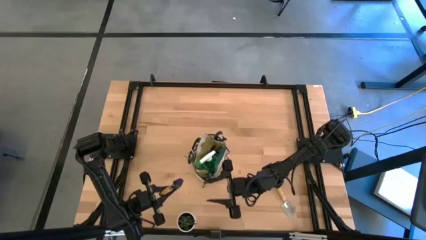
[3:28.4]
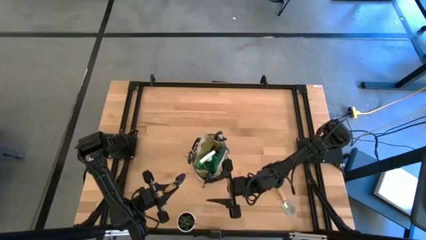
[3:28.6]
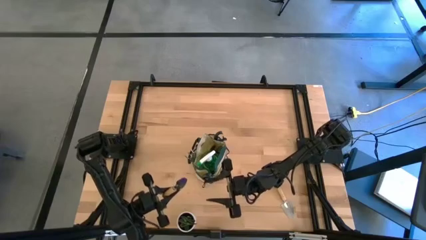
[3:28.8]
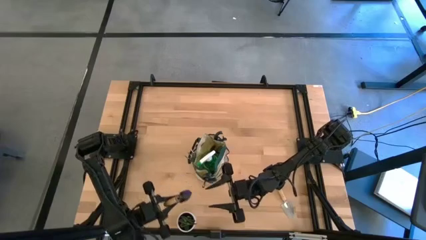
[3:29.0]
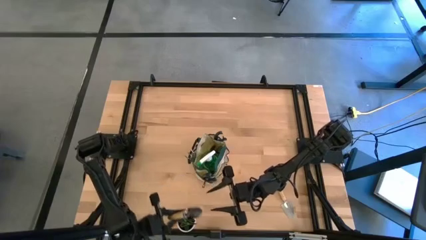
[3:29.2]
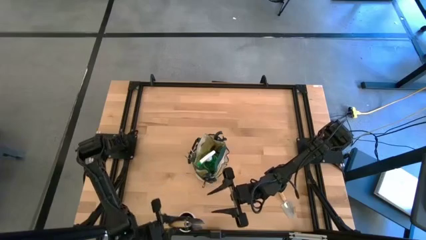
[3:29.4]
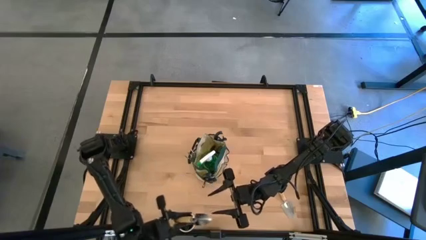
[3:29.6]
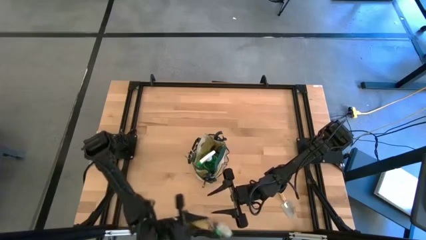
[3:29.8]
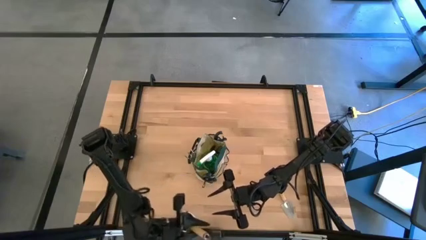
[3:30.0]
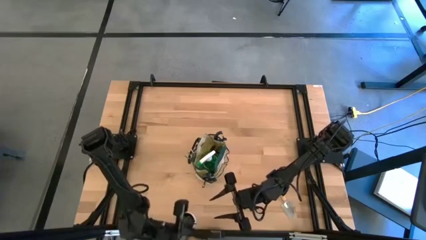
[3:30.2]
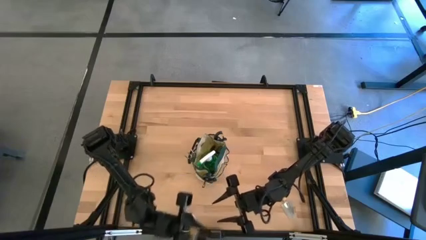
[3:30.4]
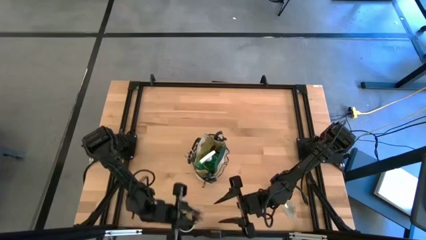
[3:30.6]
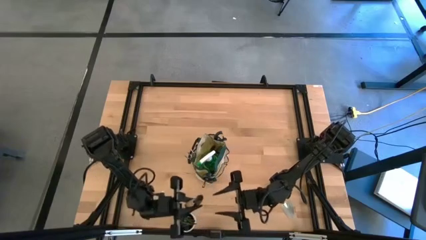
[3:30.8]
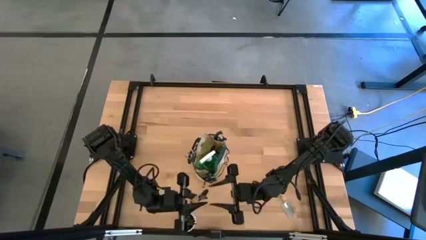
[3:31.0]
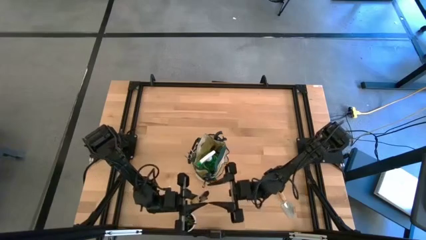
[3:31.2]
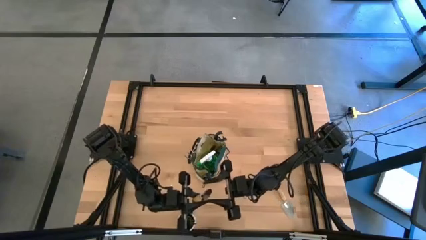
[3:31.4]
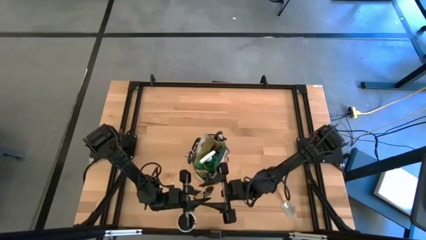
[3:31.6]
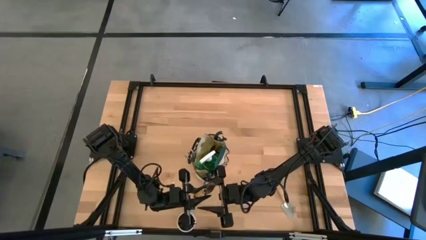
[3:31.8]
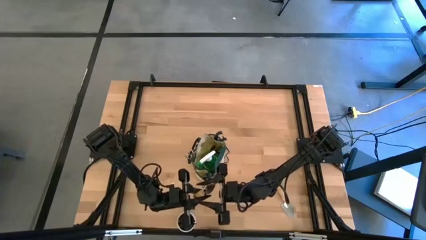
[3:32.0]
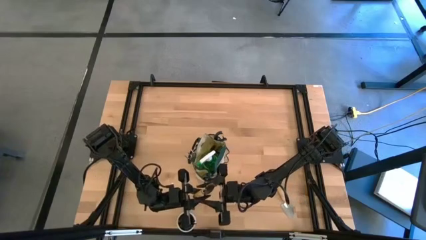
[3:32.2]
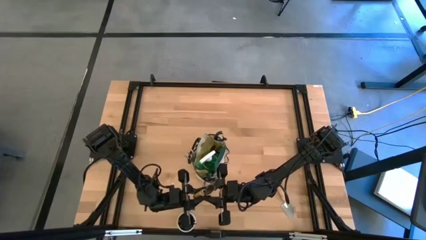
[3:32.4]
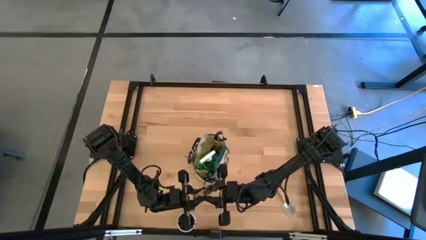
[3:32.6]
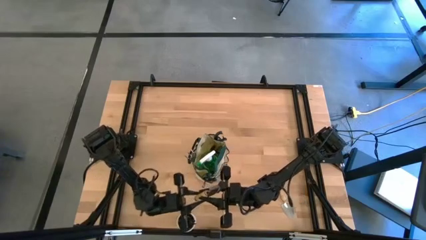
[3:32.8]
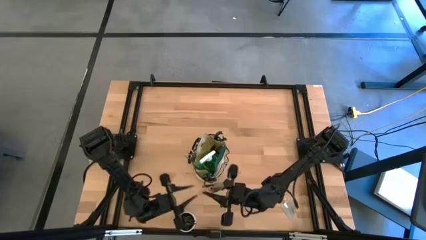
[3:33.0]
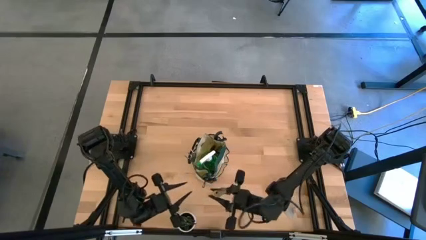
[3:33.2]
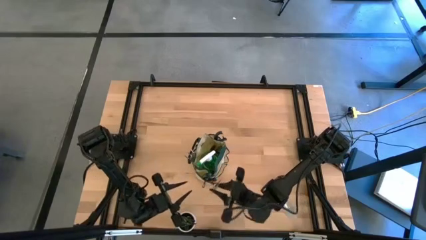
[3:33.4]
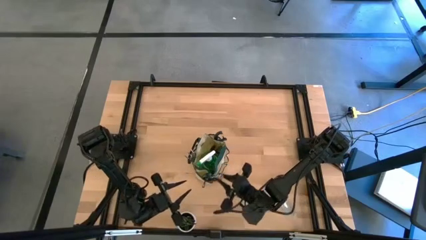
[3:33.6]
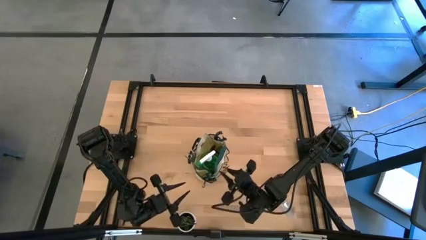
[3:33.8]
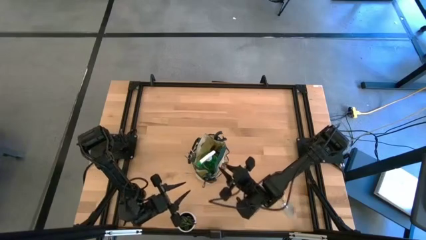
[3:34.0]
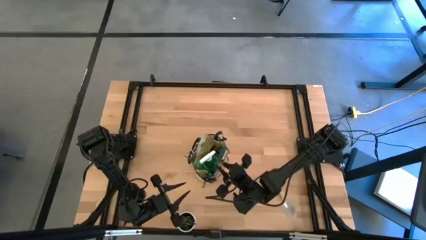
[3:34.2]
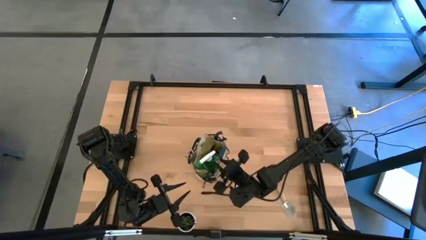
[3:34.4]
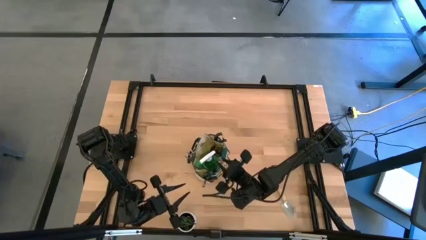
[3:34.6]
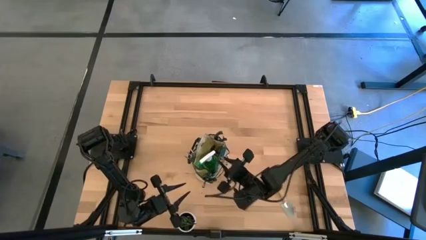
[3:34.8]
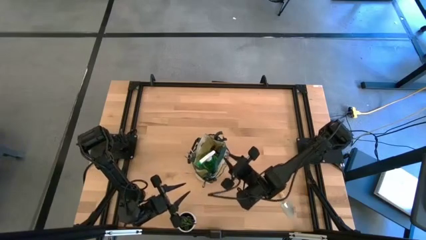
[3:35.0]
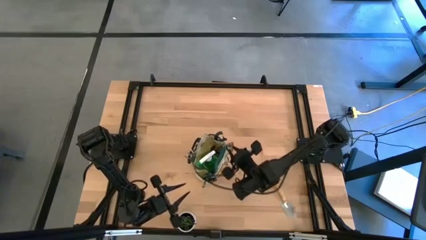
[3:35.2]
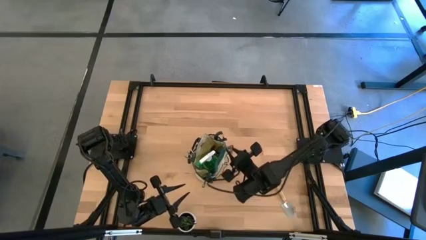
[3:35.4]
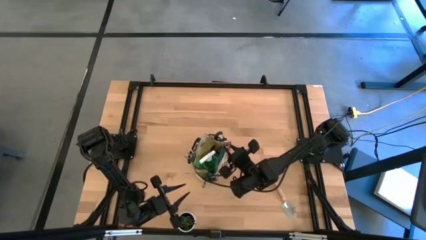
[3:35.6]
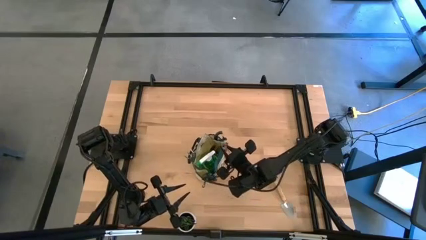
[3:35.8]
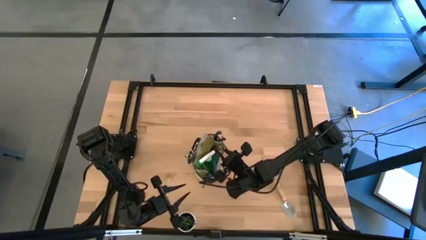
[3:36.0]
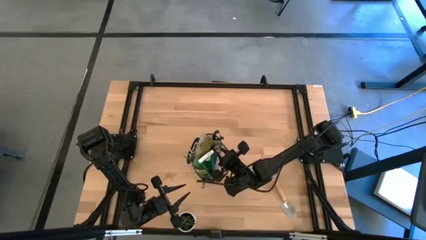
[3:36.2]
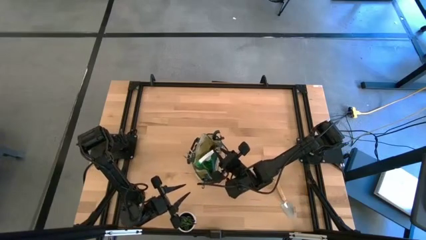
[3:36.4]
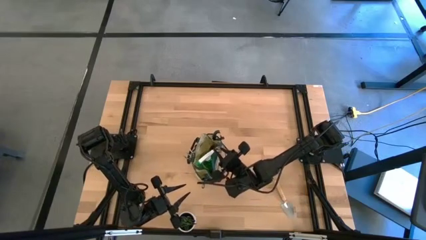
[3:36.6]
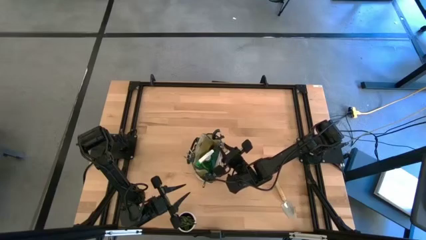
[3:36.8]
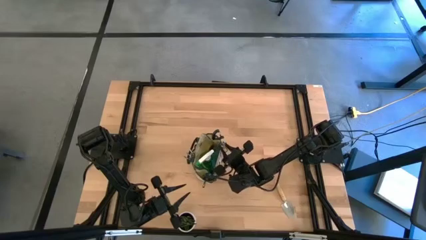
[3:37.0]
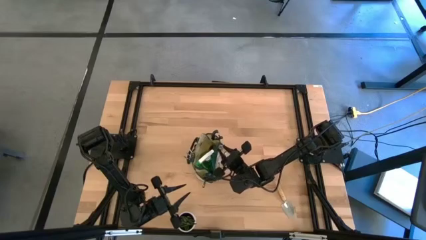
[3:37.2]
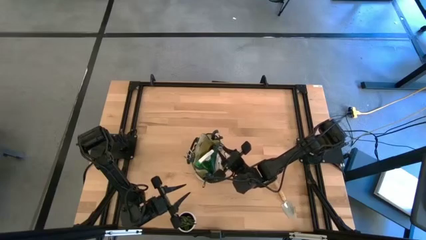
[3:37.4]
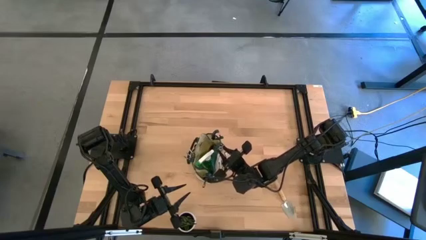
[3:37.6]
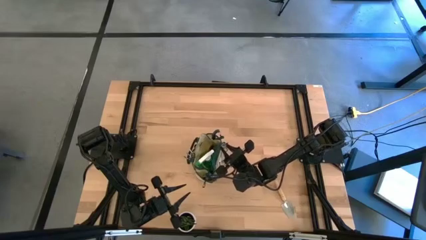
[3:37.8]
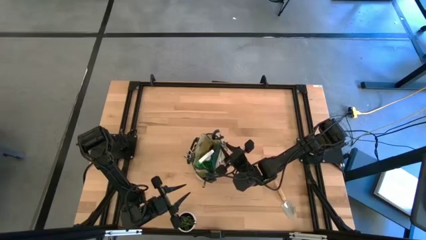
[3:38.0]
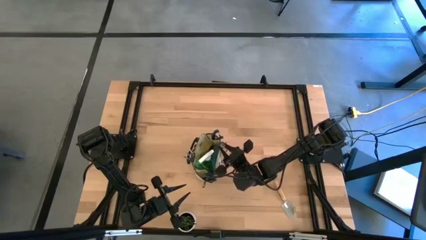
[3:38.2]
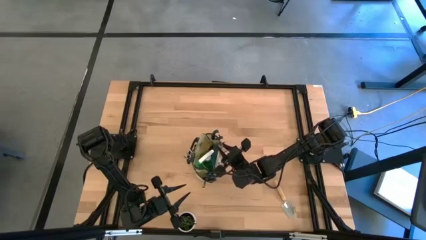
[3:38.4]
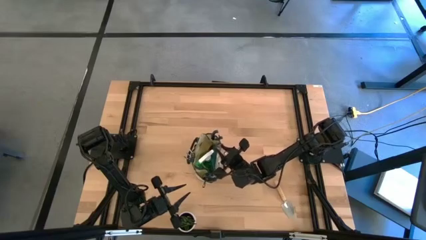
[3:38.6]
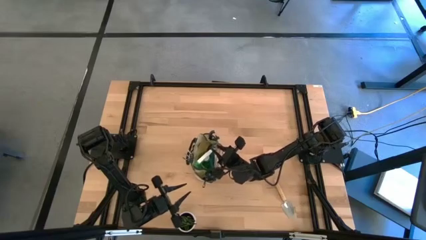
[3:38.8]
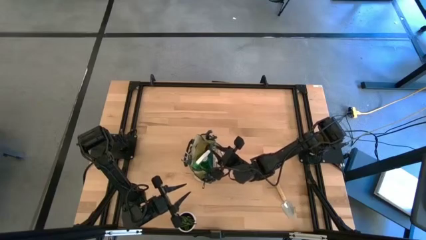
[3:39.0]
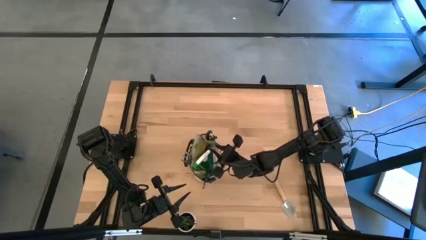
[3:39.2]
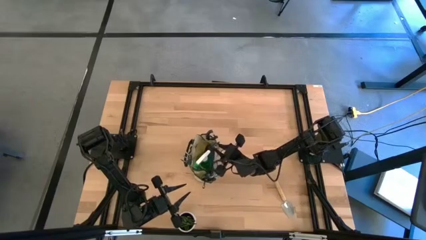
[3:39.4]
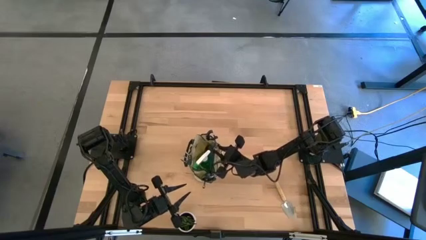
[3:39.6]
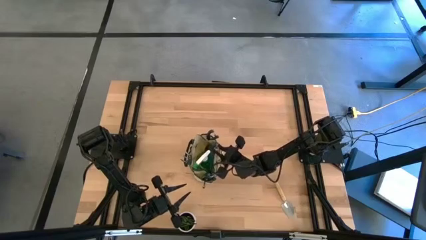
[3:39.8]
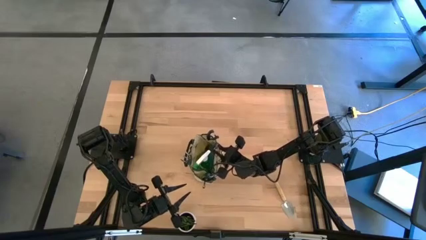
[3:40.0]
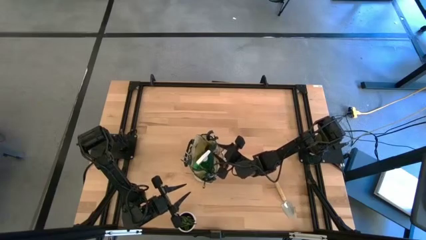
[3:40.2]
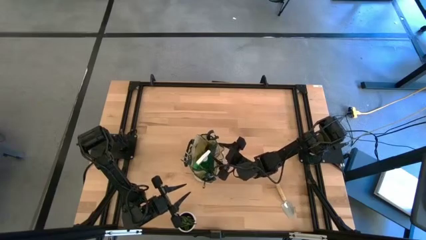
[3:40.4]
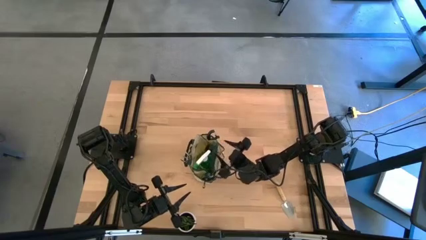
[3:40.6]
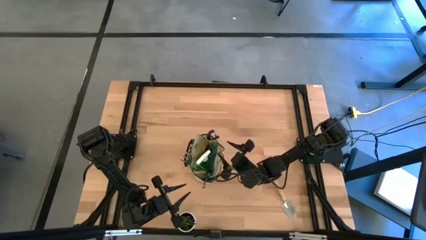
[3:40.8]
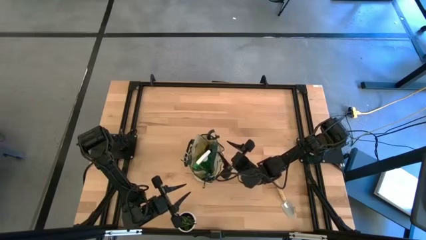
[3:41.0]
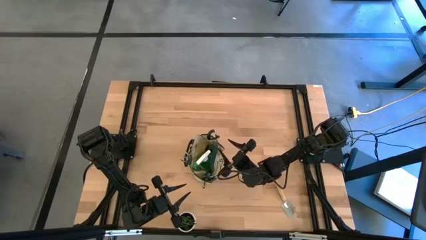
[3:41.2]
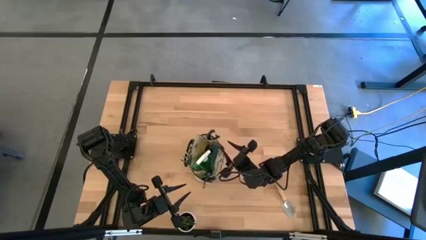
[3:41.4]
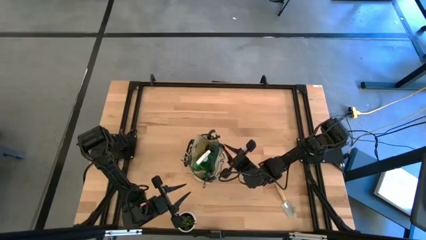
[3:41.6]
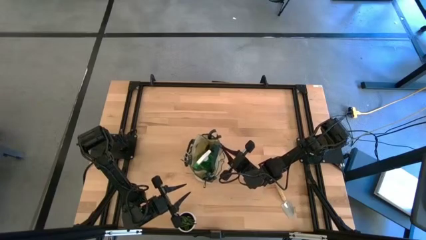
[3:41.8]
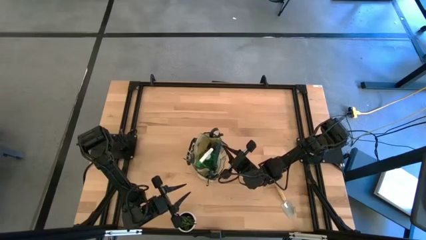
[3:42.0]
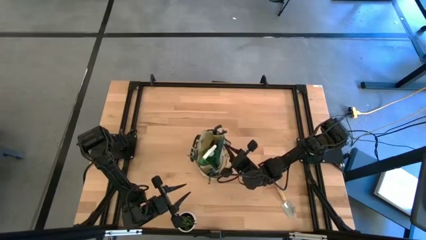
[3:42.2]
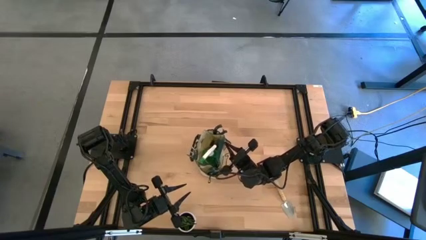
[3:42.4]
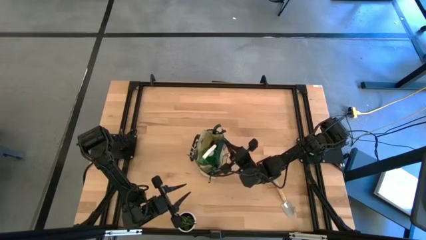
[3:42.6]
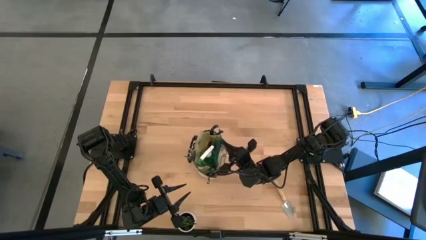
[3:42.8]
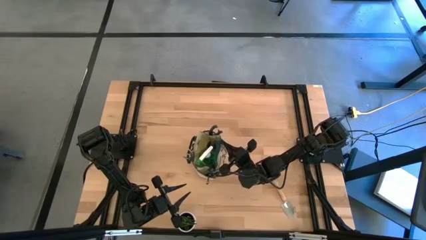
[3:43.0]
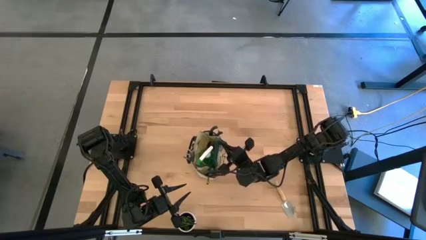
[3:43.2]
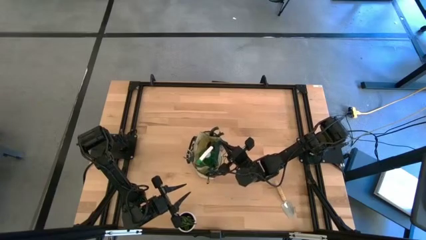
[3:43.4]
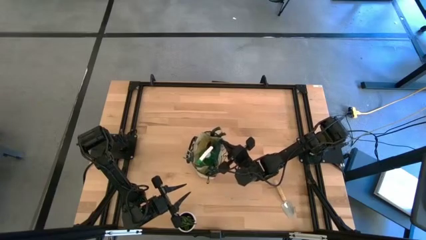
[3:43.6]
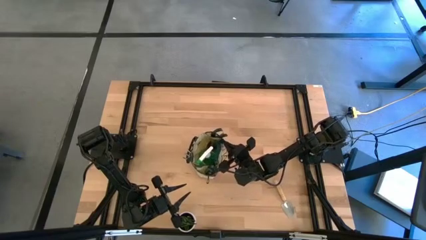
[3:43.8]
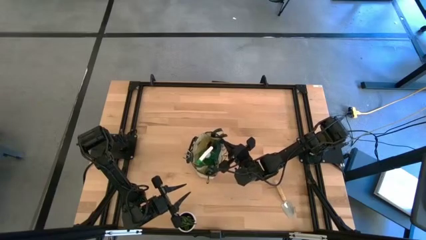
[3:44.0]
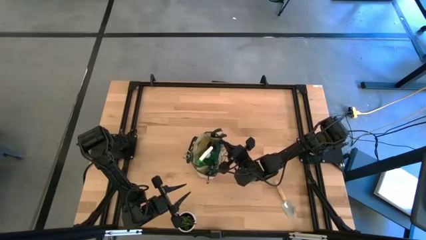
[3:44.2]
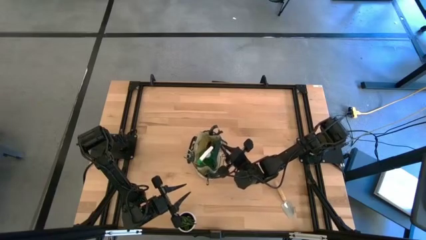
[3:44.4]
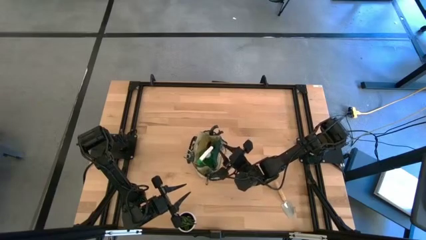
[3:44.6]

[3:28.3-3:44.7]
Task: Pick & Place Garden tools in Gardening bag
Put the left brown trowel into the side pocket of the green gardening bag
